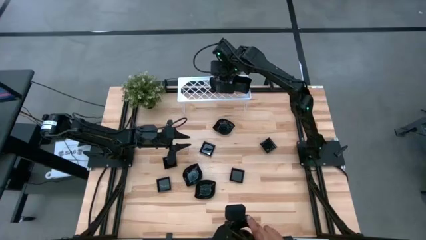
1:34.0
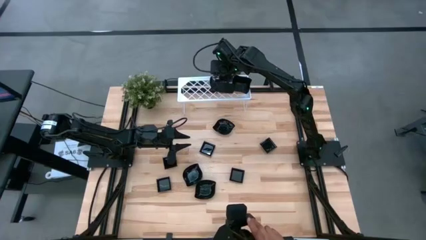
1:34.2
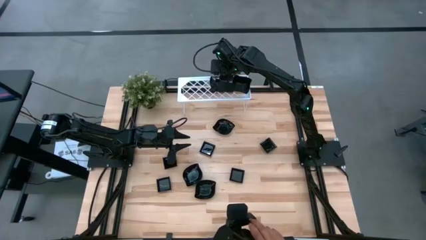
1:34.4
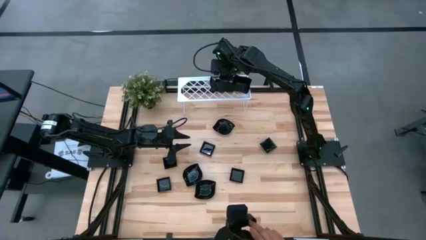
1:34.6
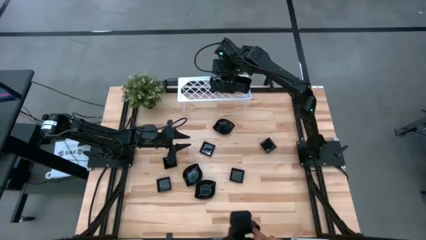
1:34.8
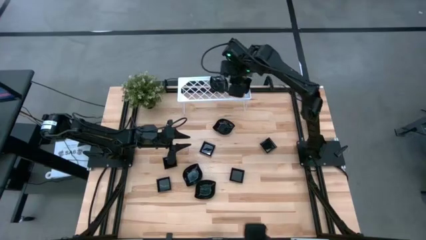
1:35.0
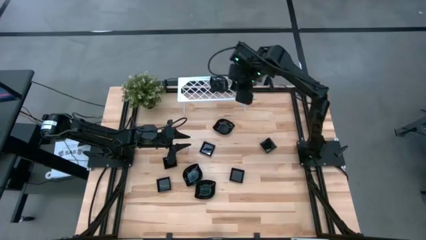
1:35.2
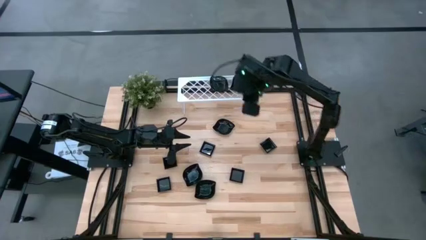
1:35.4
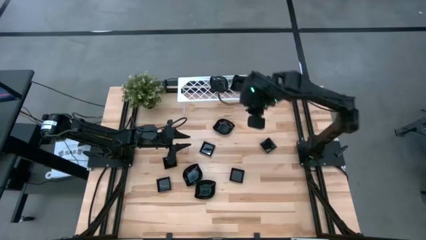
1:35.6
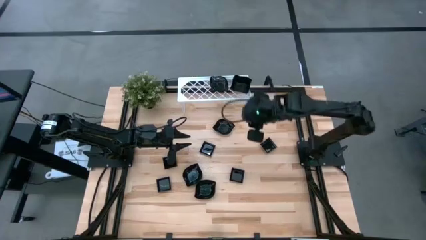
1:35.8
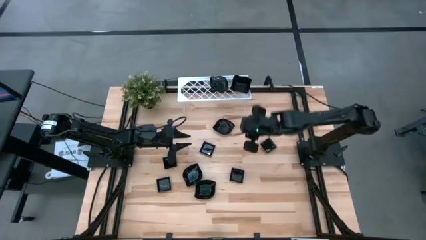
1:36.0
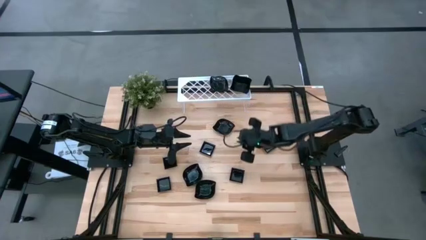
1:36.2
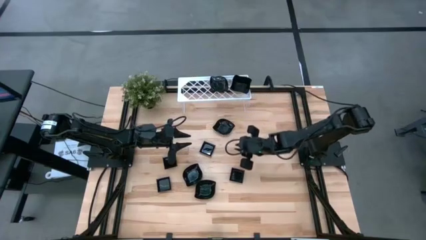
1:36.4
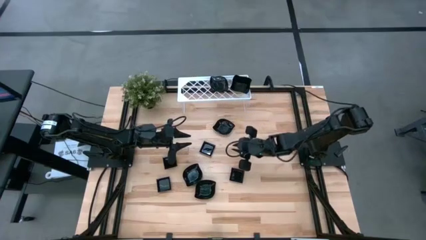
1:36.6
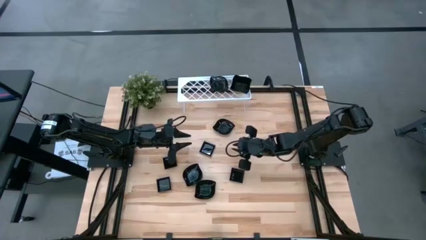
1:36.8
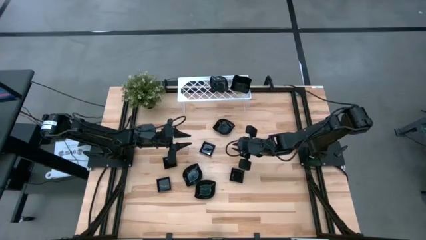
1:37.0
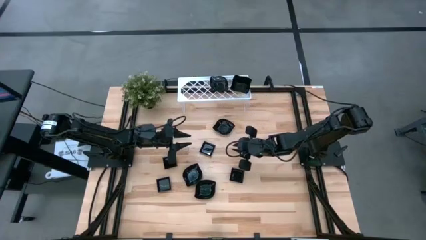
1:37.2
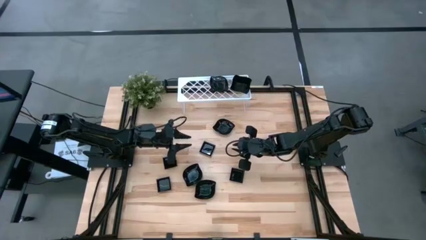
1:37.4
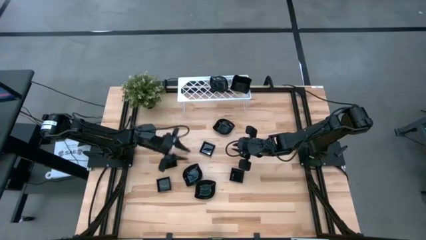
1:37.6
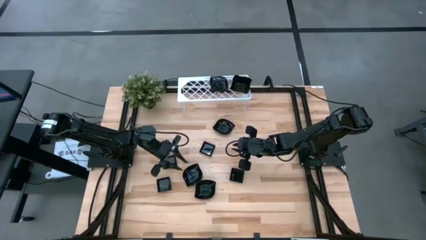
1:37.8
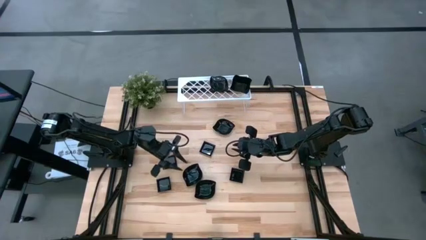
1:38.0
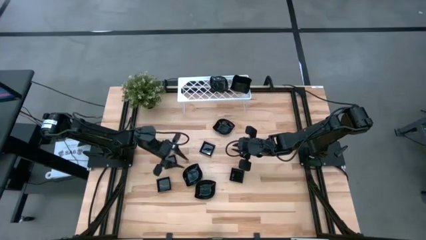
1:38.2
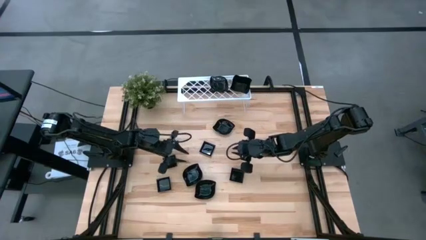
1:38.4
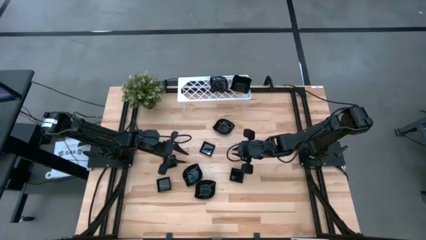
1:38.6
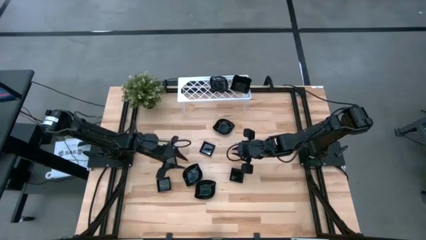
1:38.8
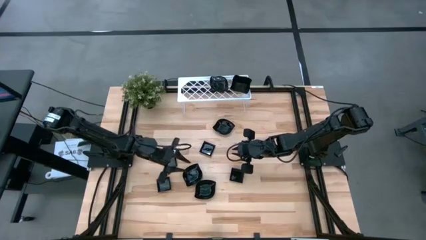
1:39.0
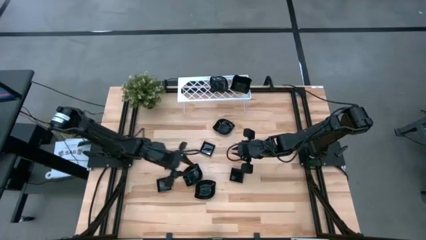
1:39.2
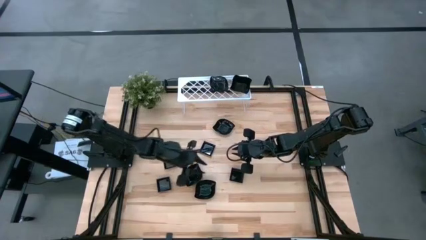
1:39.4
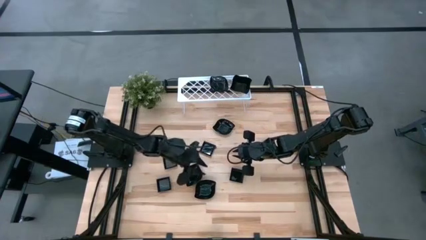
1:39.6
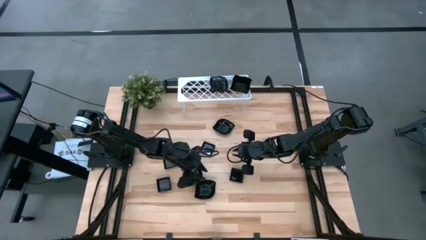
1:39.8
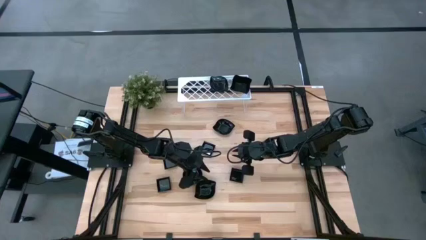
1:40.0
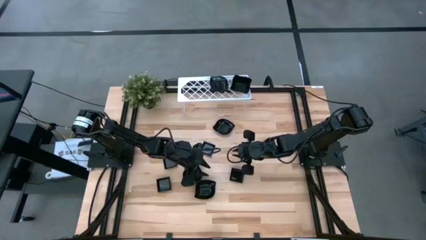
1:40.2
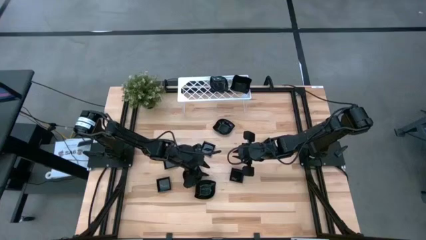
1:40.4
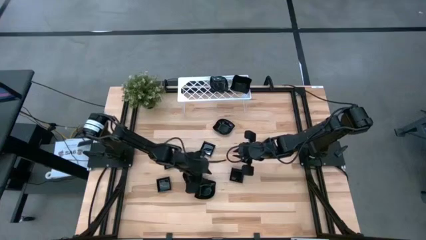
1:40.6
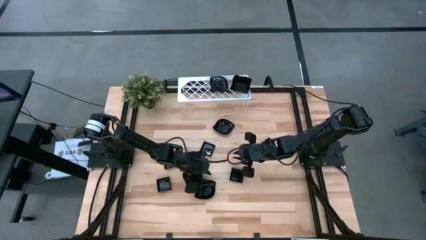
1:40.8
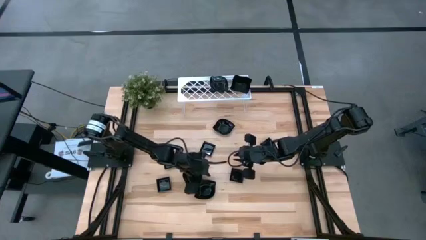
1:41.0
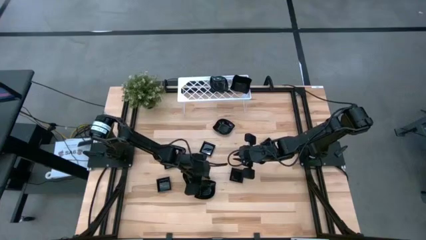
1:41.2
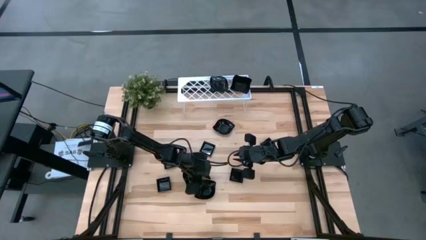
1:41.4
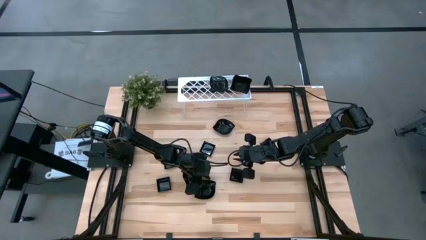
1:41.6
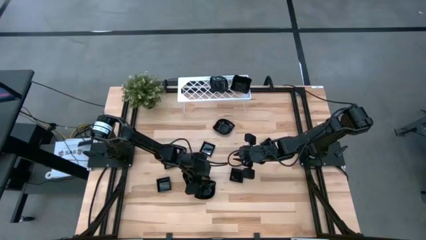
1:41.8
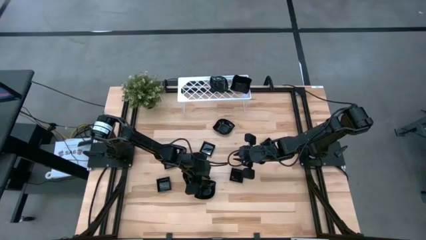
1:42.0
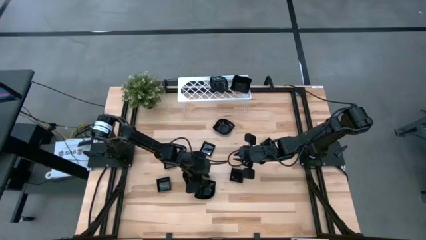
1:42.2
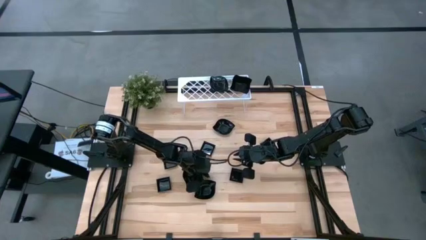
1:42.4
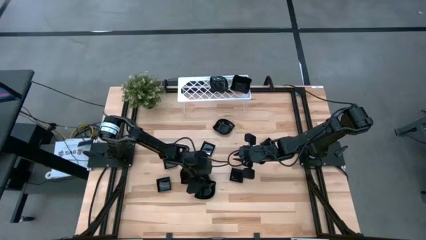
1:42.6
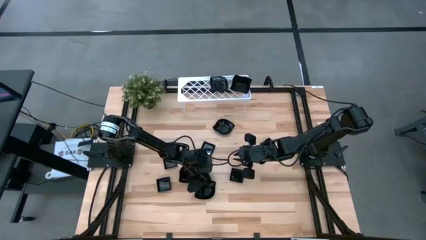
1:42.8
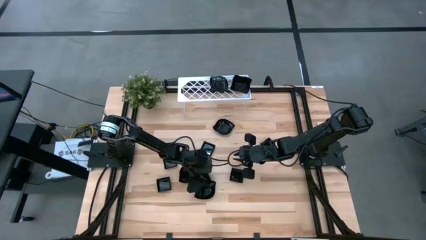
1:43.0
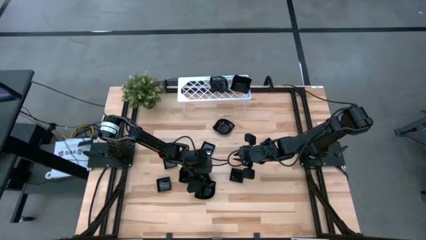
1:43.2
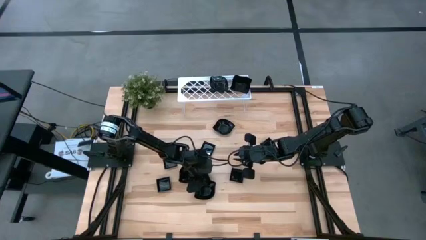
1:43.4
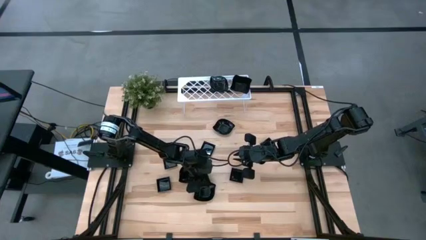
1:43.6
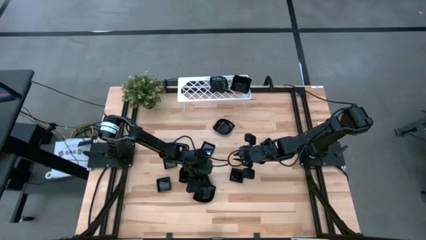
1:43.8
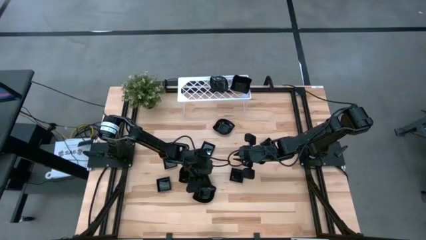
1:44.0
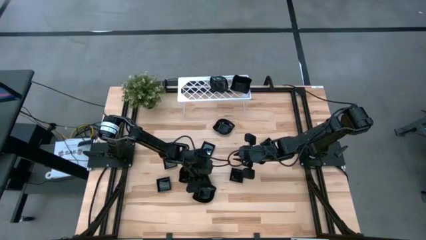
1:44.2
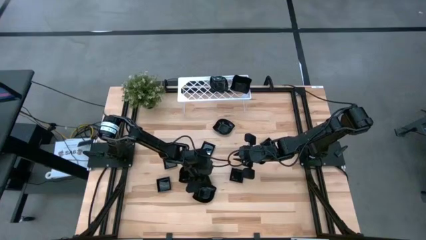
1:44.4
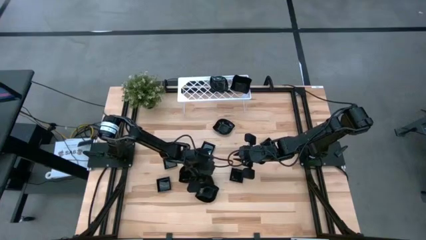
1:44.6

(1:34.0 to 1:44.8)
Task: Pick & Place Mini shaped plates
Stack the black leaf-shaped plate on top of the black leaf-shaped plate on the shelf

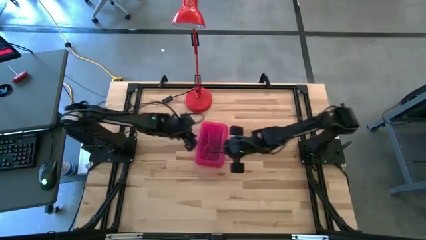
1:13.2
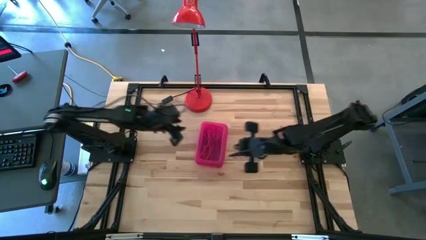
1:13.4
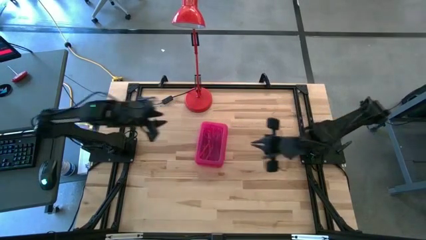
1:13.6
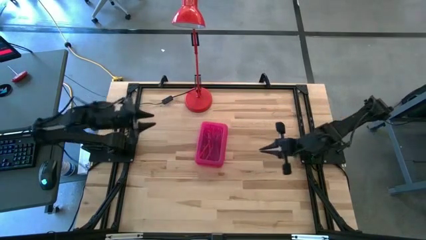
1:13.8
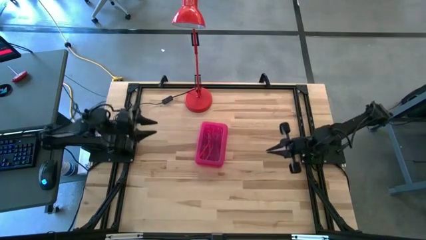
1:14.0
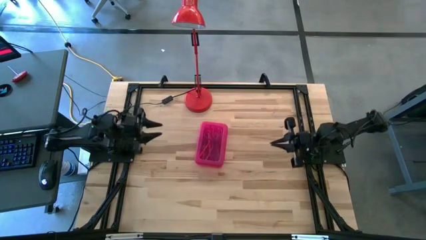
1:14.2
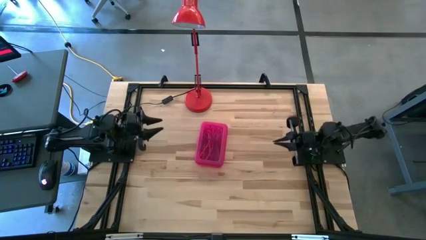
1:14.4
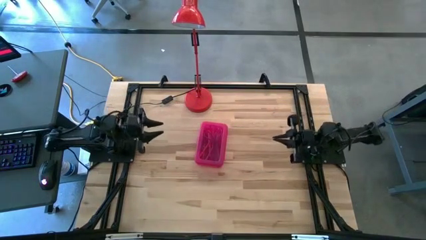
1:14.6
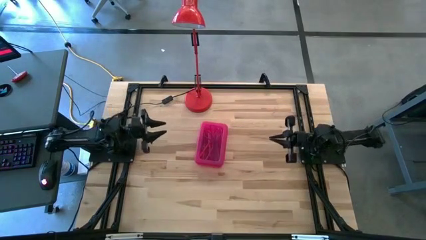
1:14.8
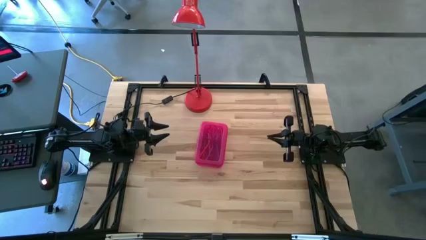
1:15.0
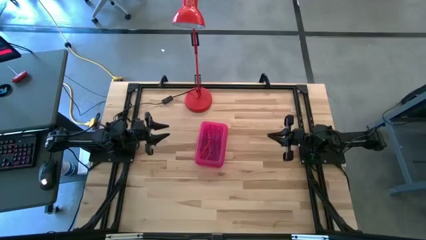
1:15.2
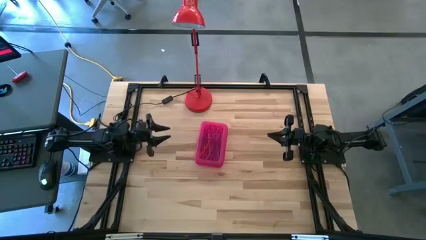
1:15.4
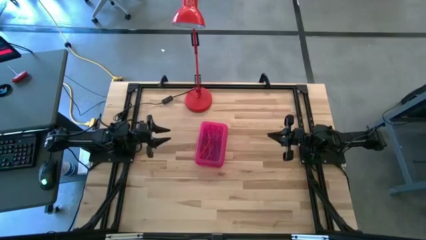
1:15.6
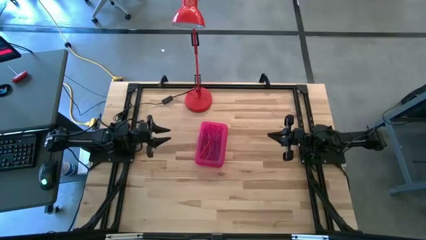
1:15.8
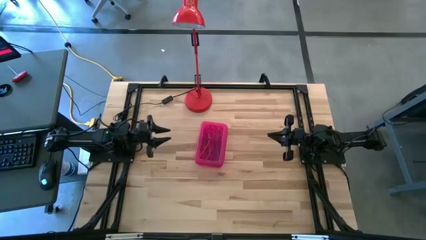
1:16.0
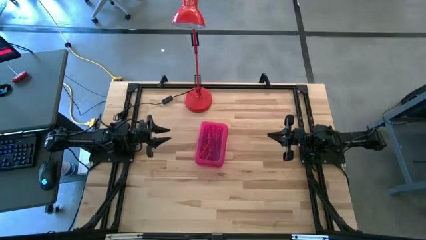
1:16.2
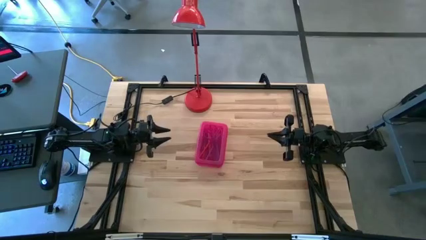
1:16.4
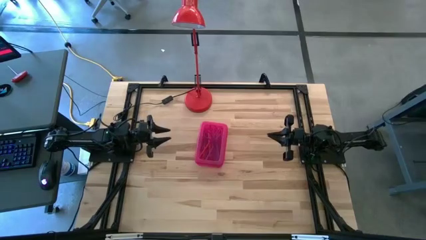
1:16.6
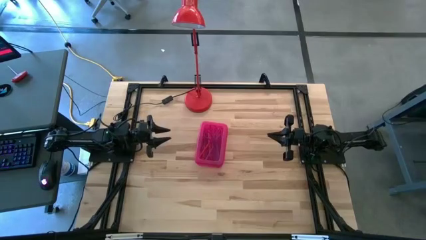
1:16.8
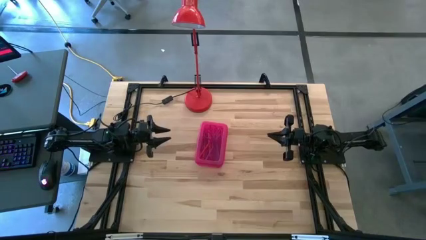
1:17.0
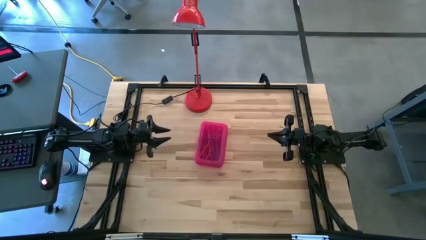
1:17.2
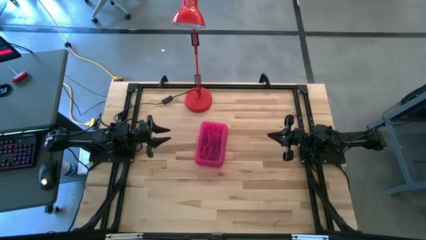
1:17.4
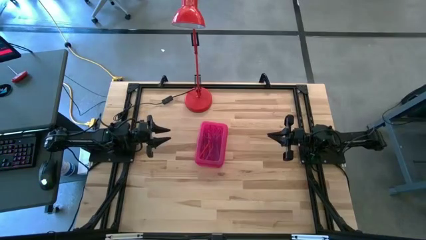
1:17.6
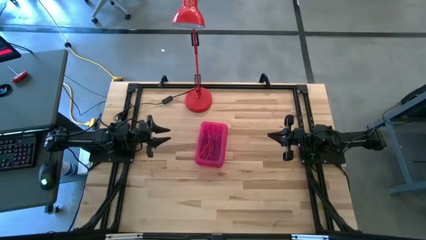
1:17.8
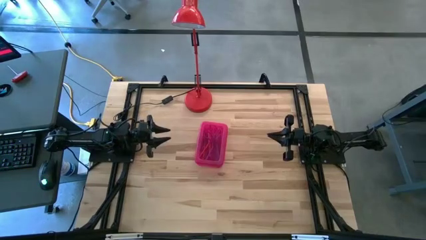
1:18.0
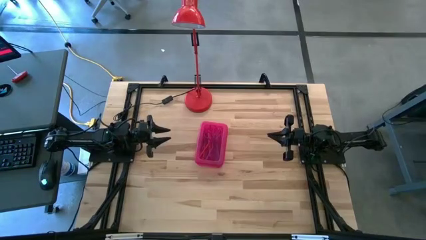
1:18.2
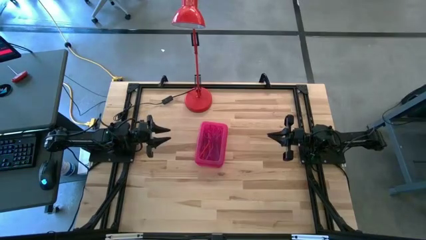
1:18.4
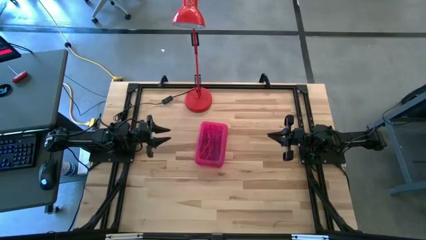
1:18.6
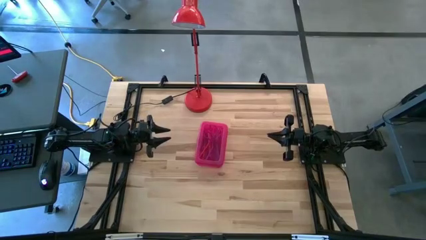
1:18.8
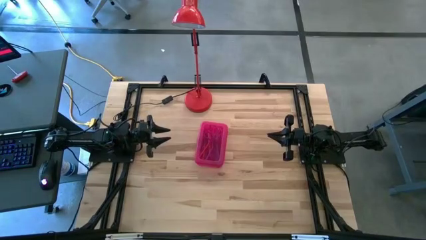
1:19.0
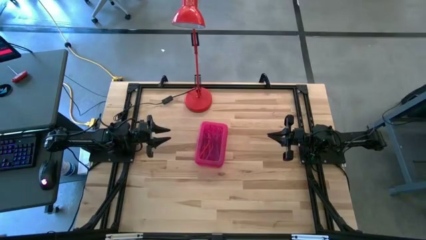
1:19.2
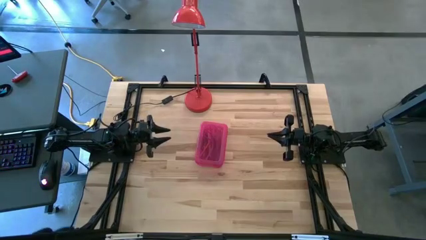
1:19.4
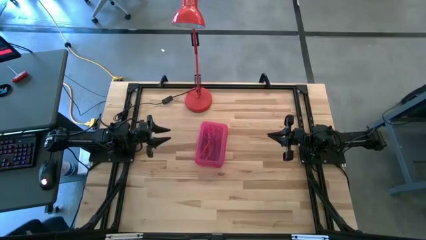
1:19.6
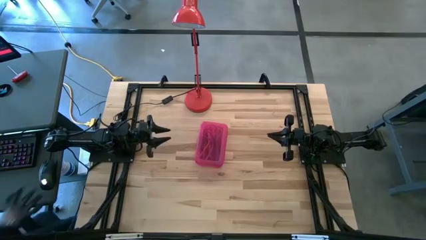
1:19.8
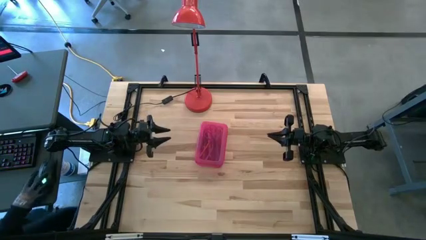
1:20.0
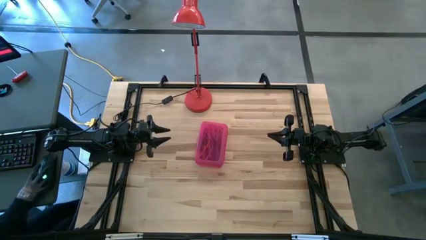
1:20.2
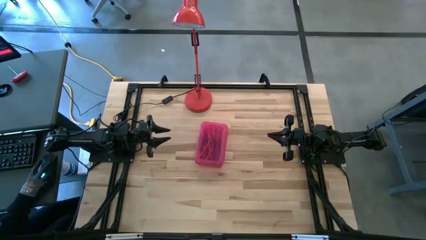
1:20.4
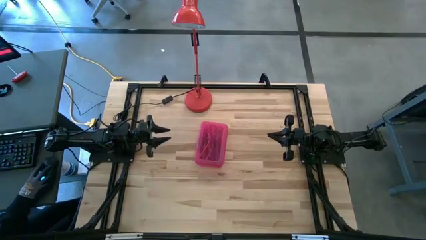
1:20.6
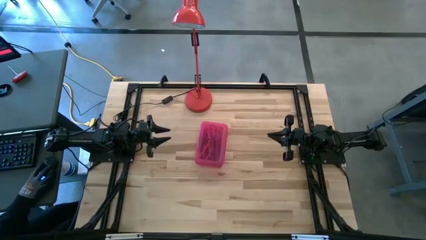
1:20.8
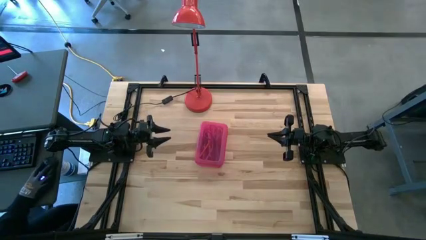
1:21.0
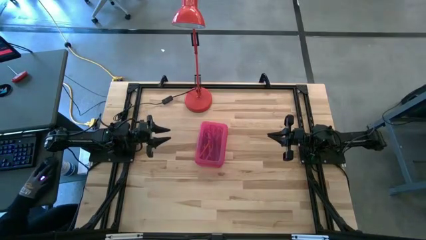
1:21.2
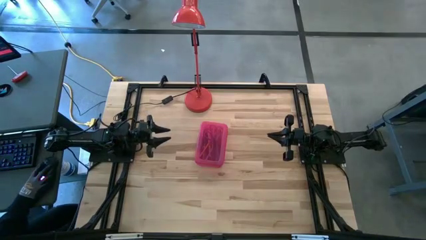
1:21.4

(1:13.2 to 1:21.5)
Task: Pick & place school supplies into a supply box
Return to Home Position
